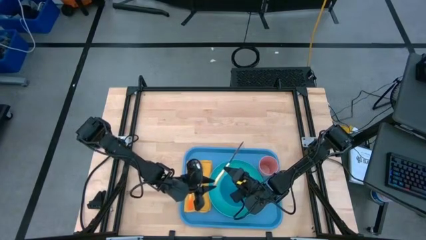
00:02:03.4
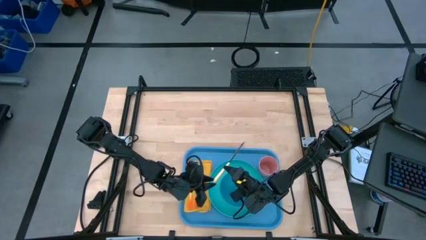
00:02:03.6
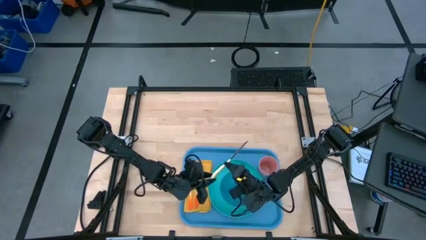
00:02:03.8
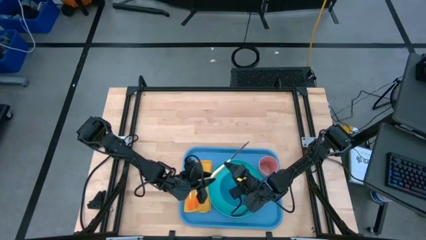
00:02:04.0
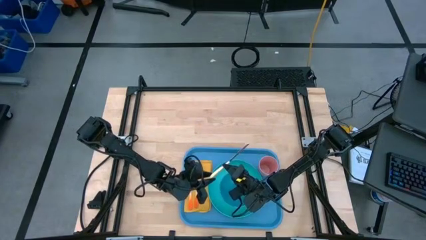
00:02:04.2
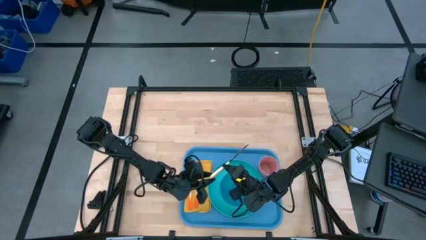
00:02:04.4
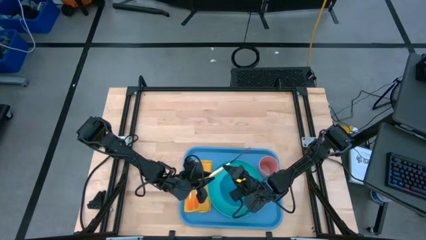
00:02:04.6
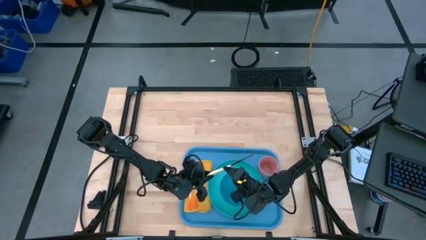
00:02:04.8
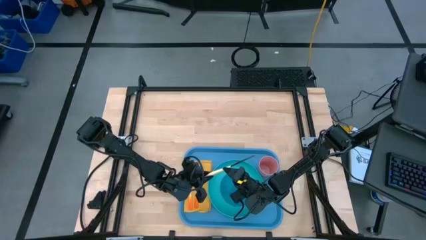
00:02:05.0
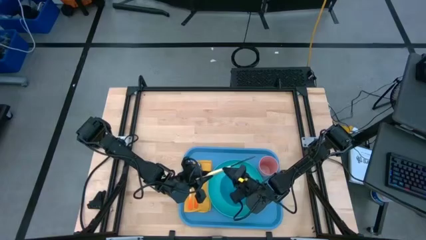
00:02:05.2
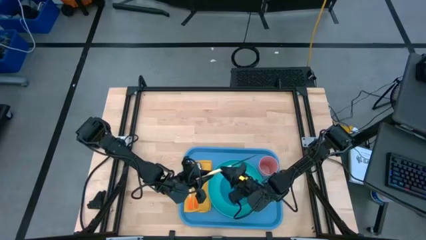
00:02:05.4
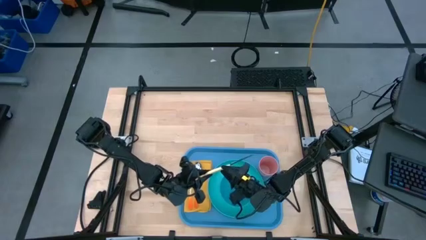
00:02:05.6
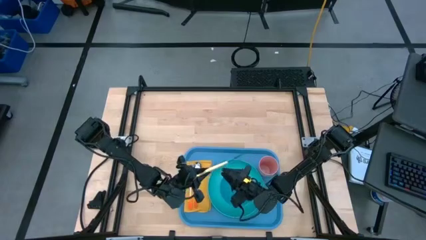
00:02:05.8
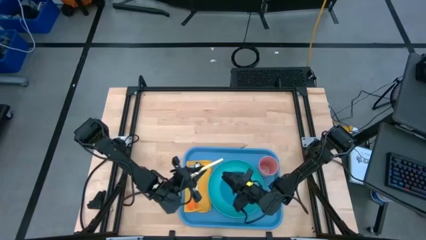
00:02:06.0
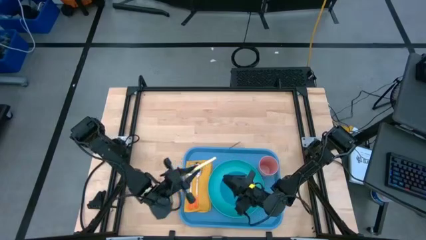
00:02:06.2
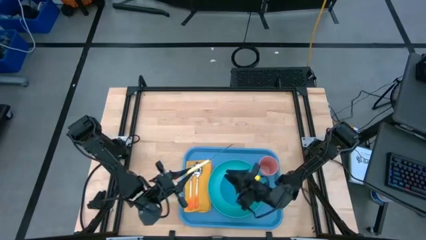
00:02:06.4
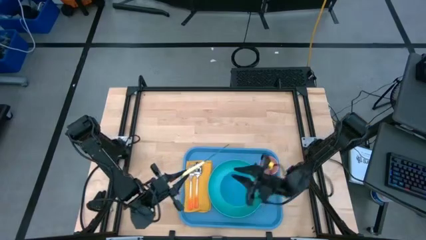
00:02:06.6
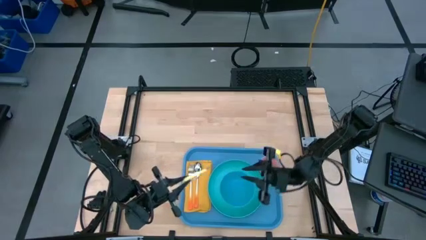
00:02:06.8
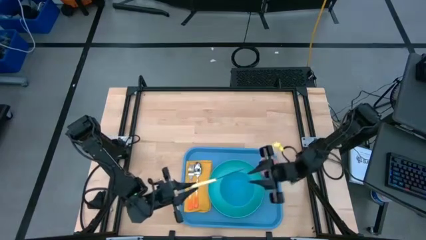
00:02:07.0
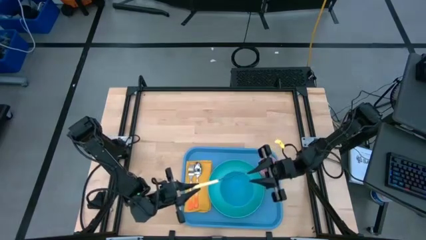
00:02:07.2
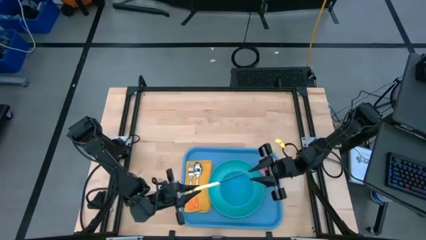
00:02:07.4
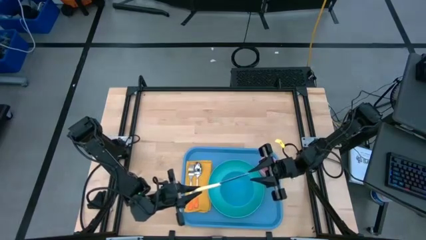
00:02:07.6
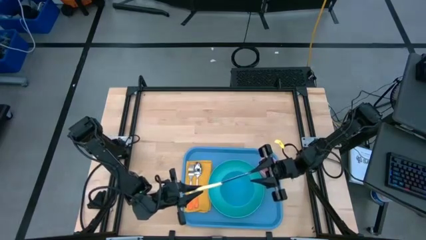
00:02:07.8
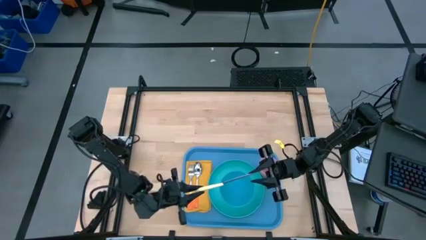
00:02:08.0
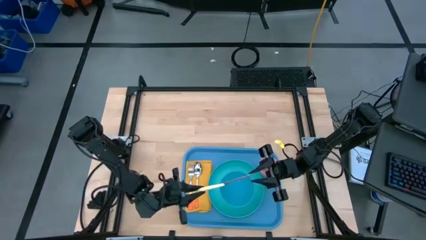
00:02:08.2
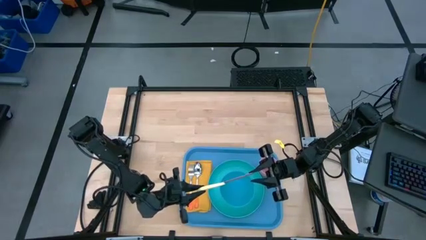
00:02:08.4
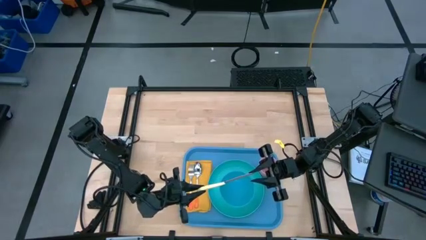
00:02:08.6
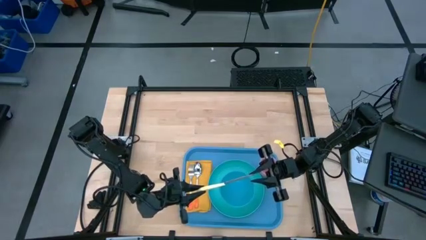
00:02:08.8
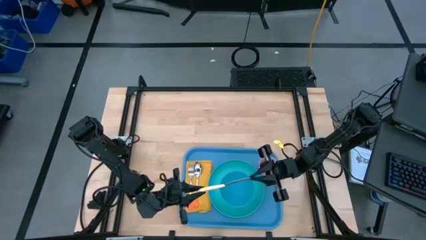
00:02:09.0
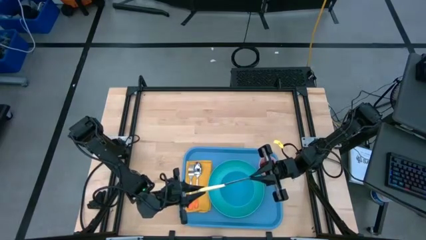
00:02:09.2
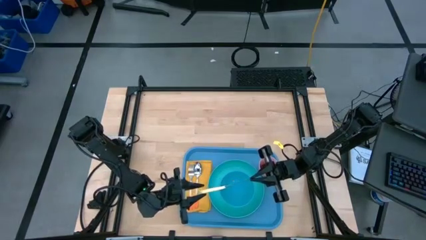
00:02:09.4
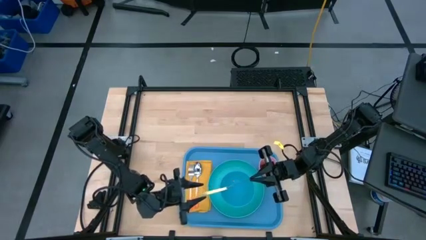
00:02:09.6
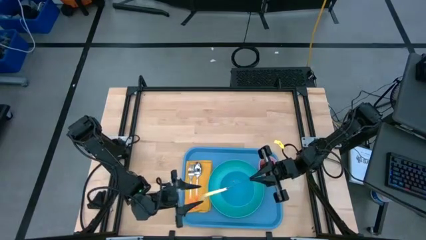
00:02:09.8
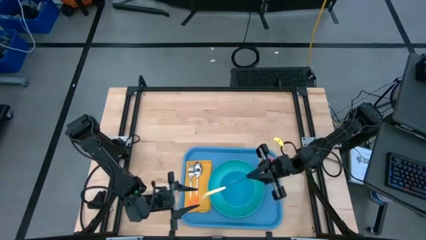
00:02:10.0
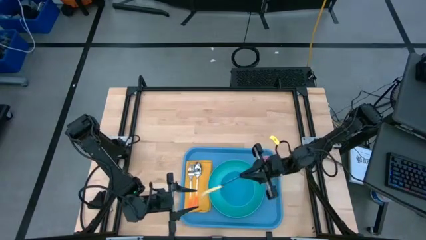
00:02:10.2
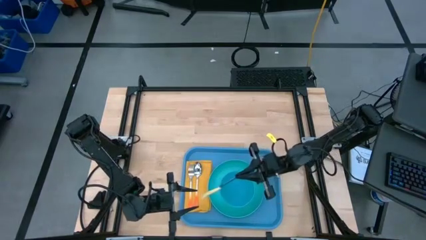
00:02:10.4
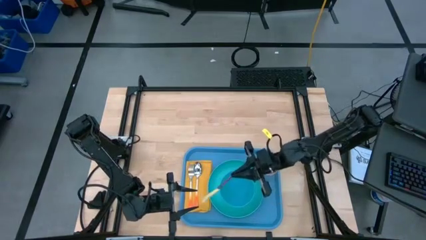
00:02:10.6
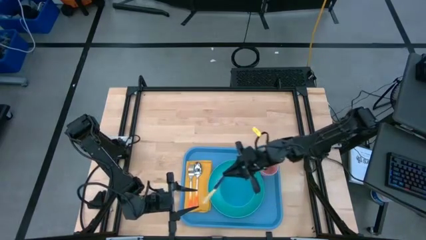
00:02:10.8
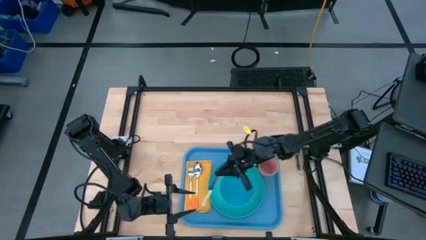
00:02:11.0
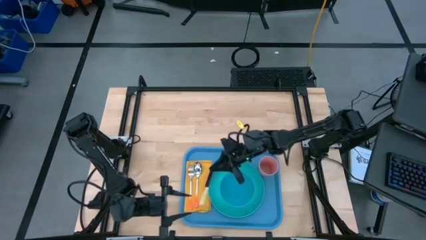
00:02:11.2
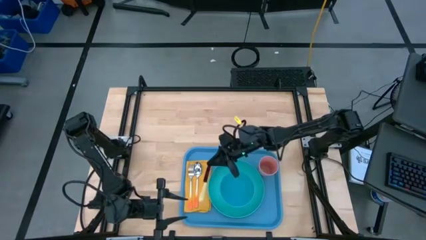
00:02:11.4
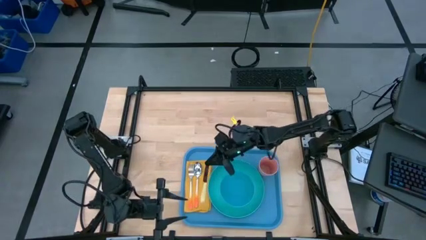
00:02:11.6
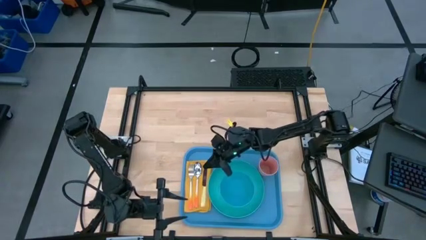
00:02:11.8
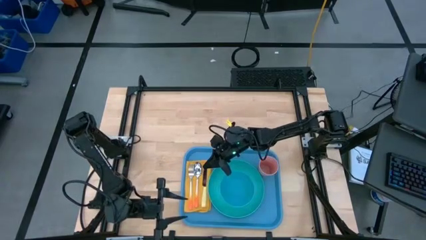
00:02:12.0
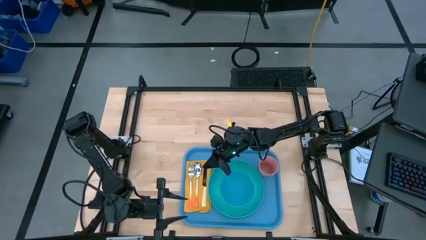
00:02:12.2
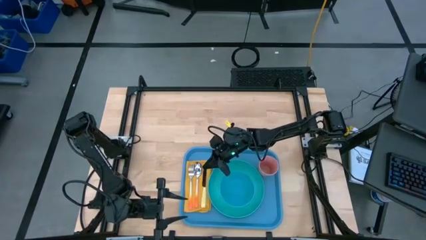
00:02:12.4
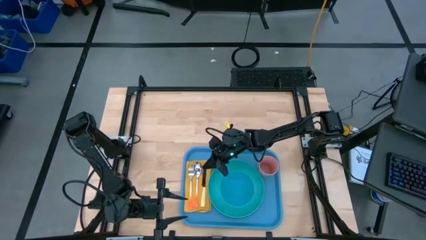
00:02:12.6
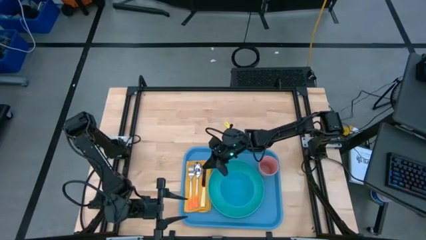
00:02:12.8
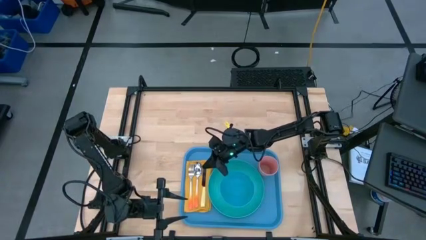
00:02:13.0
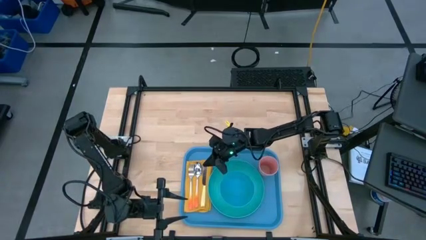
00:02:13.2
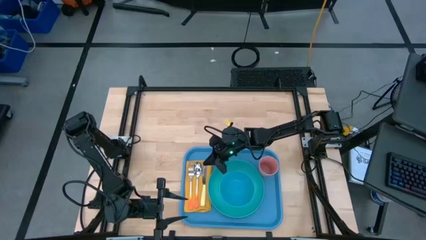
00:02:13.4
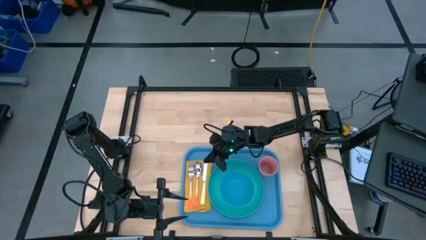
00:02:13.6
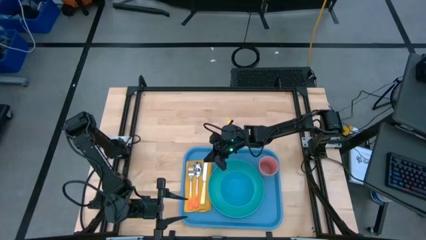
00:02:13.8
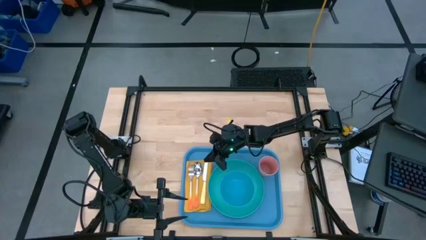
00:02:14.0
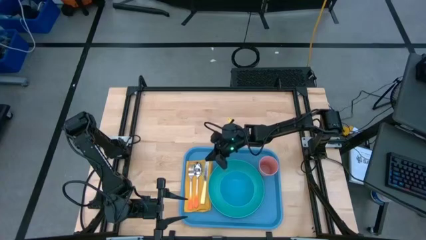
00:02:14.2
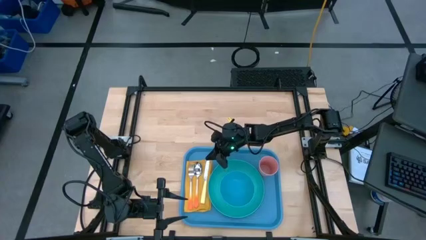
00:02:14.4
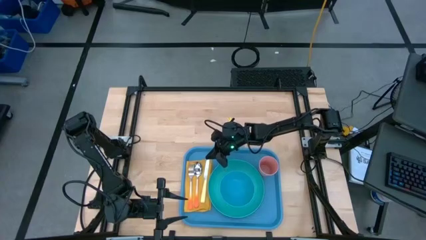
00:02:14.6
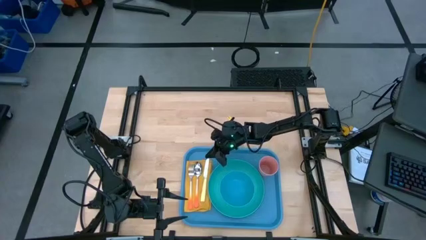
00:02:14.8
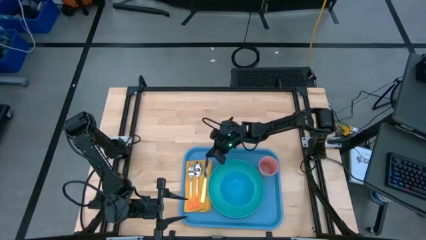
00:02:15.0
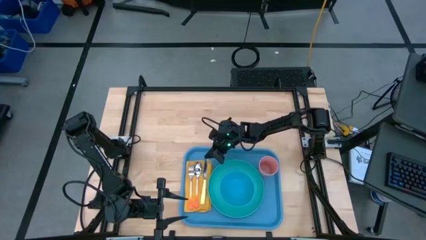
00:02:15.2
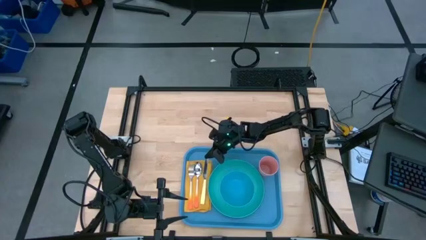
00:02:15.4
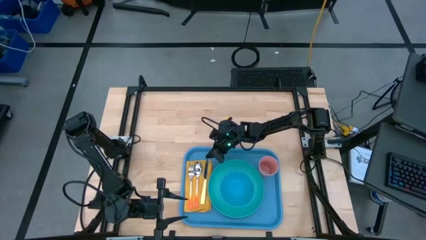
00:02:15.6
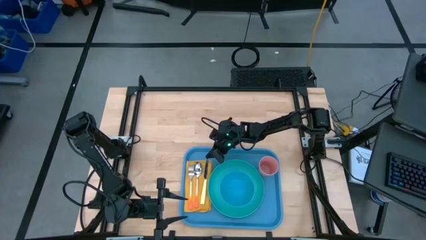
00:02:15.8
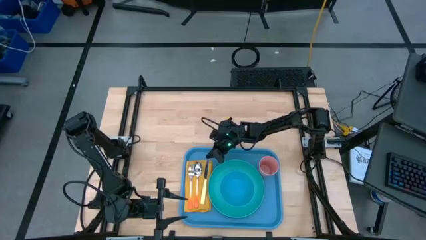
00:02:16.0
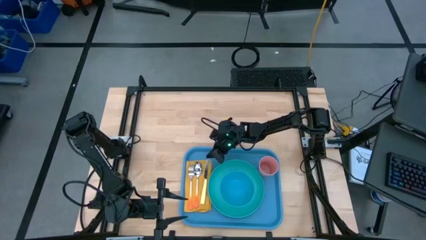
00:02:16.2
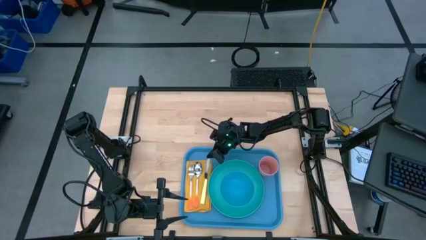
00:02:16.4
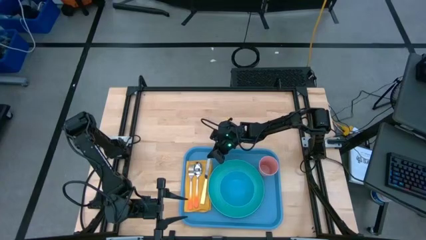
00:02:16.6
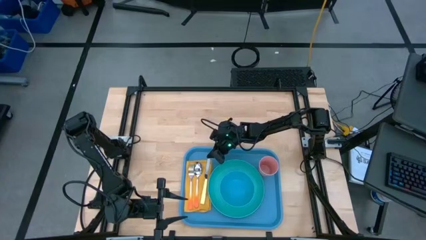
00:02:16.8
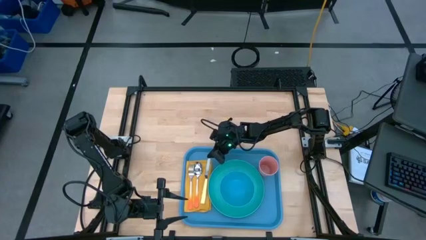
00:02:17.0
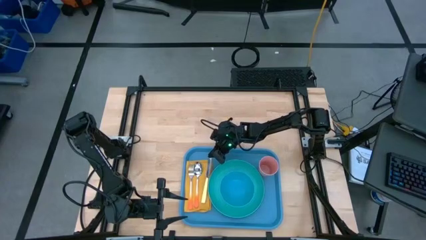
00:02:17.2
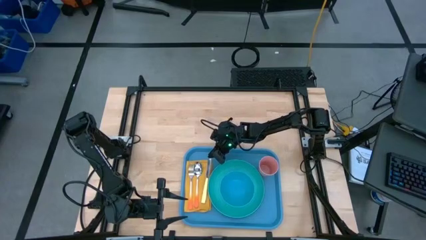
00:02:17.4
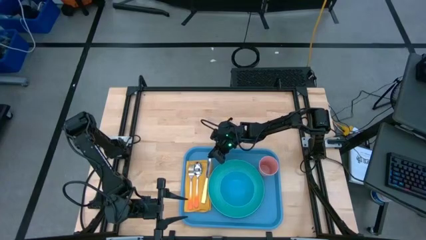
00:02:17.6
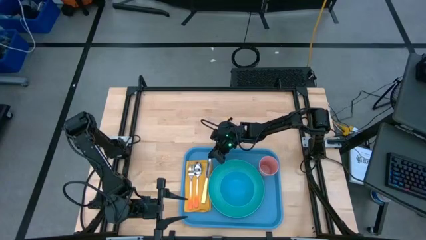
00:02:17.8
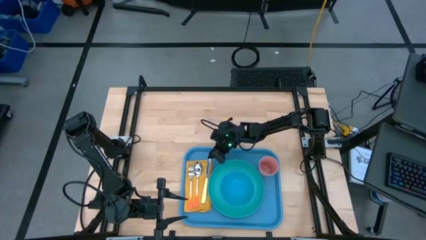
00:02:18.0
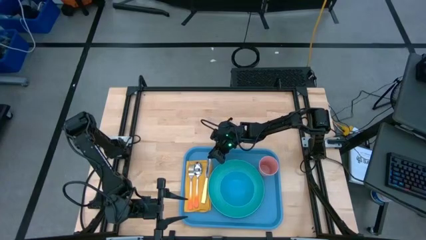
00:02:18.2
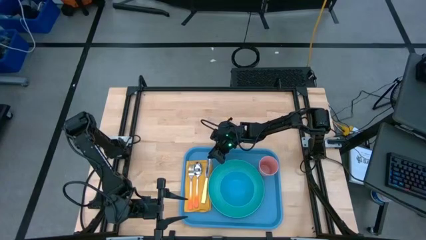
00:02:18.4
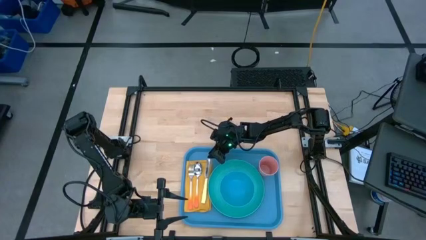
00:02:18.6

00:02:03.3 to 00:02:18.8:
Task: Set up tray
Put the knife beside the spoon on top of the napkin

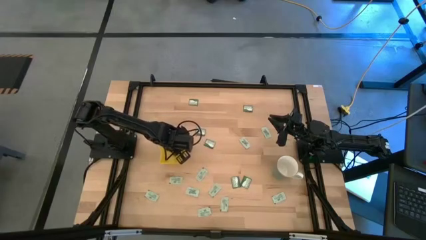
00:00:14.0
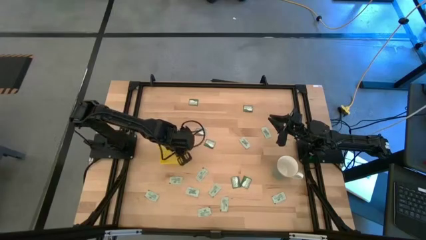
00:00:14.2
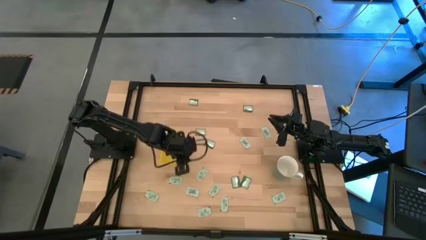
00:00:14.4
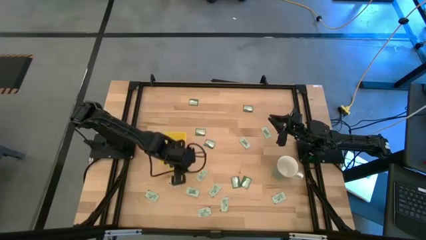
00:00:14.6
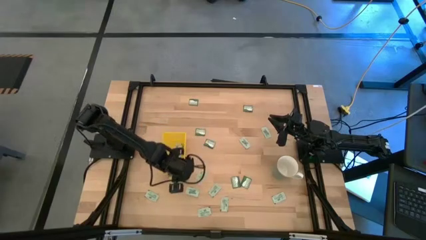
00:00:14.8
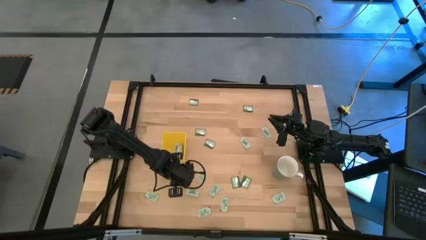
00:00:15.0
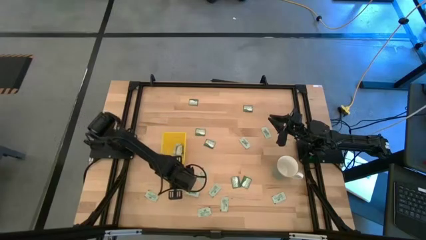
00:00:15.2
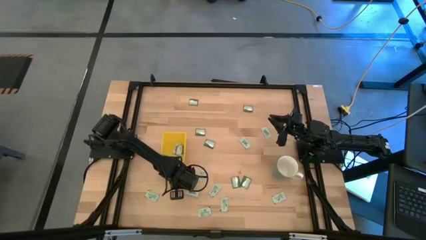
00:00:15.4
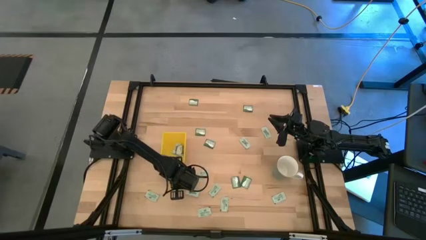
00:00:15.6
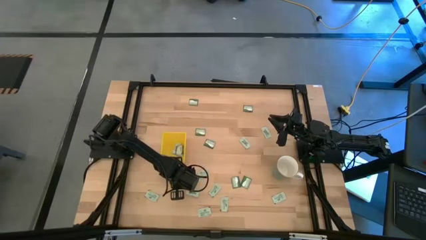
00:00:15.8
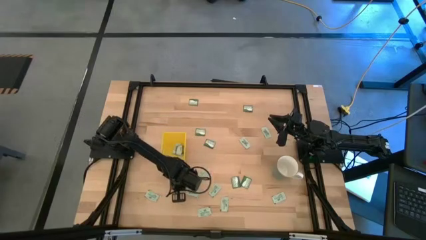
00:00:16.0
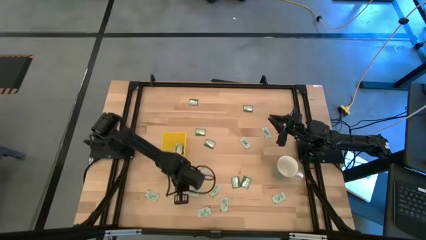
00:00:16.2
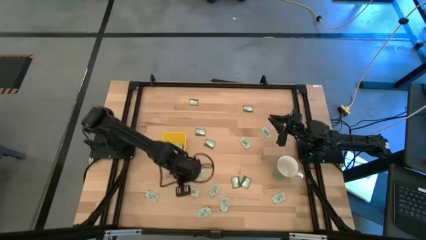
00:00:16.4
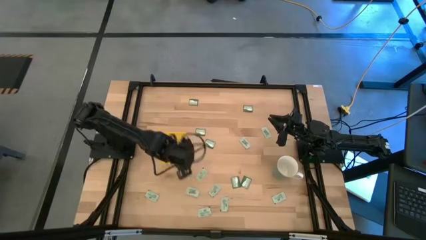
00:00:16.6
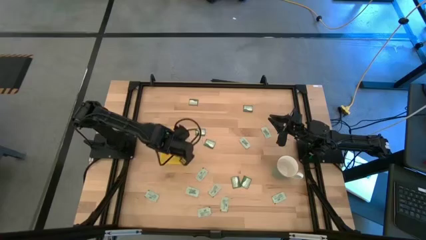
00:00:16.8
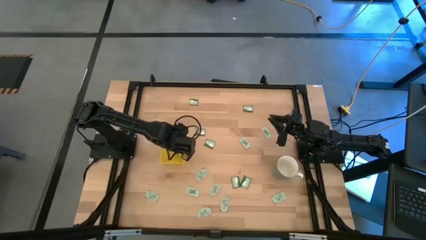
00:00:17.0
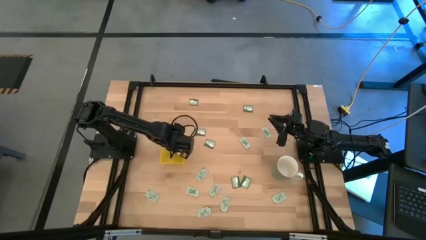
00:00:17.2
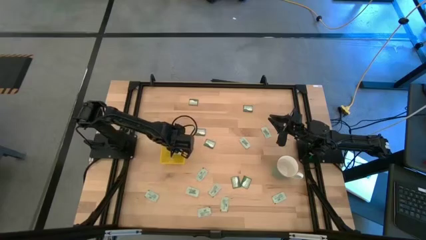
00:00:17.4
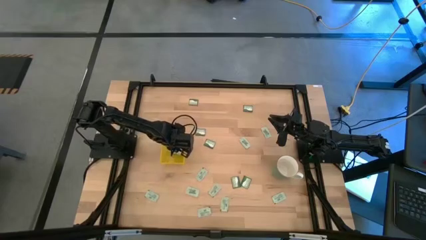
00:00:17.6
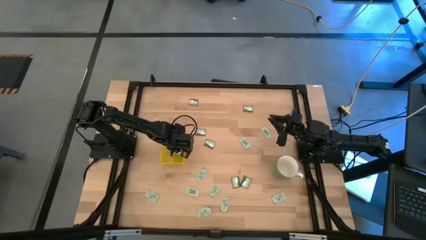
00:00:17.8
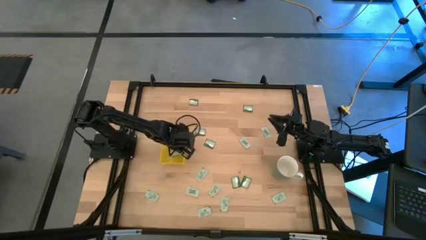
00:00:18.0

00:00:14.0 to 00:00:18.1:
Task: Pick and place Stevia / Truvia into bins
Put the white packet into the yellow bin
